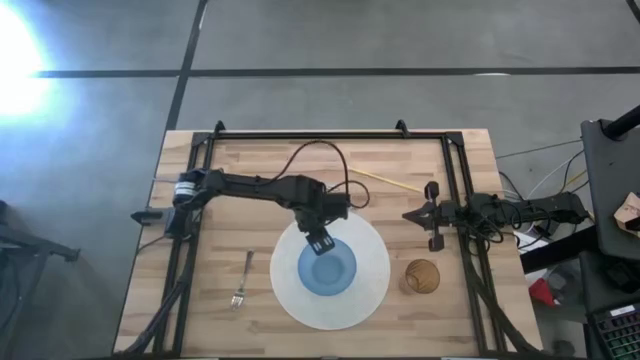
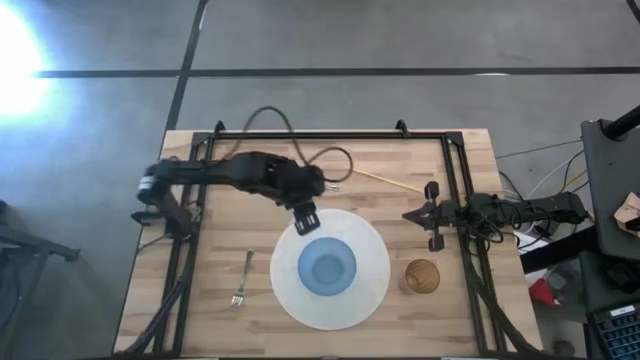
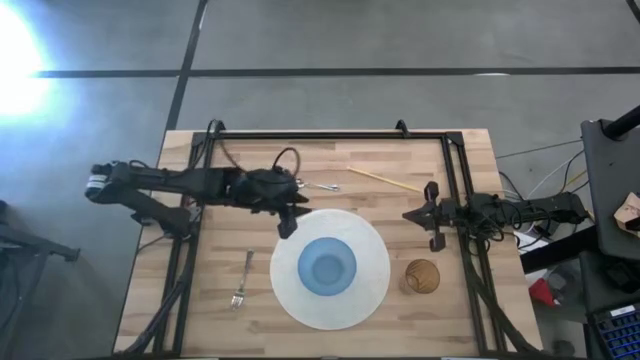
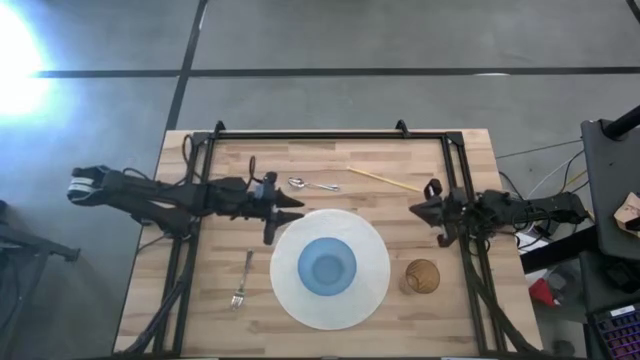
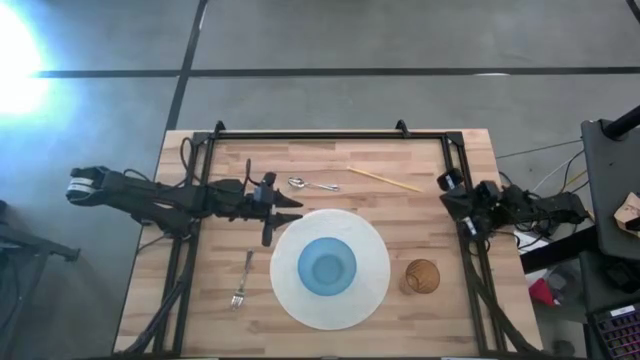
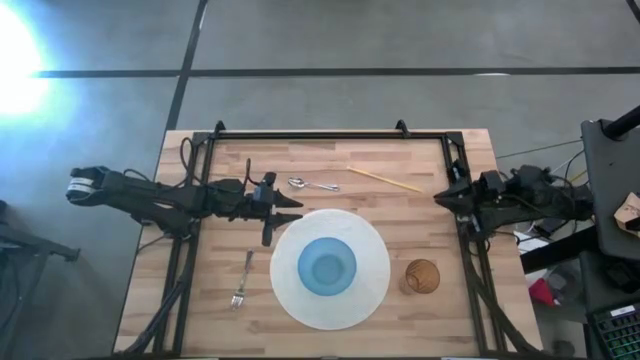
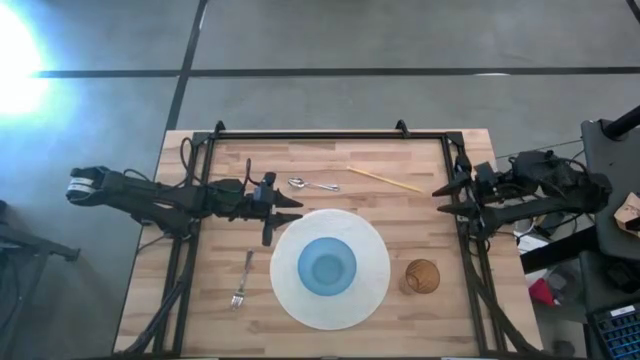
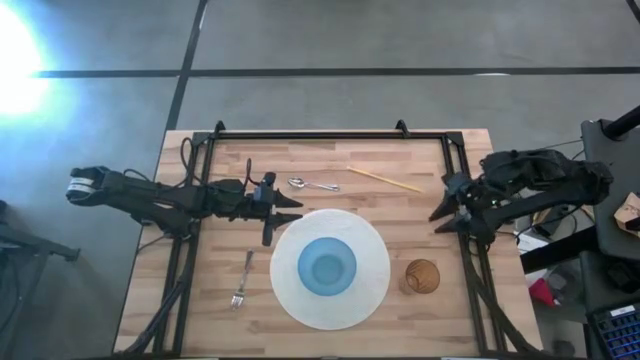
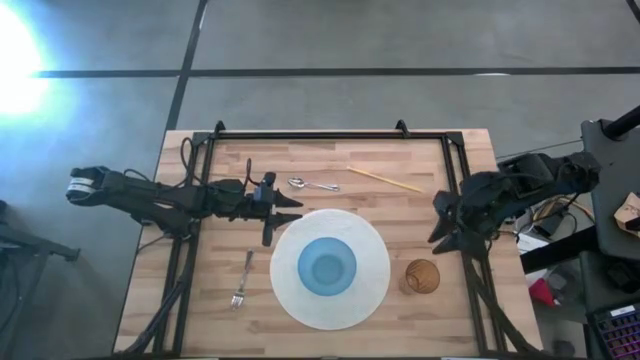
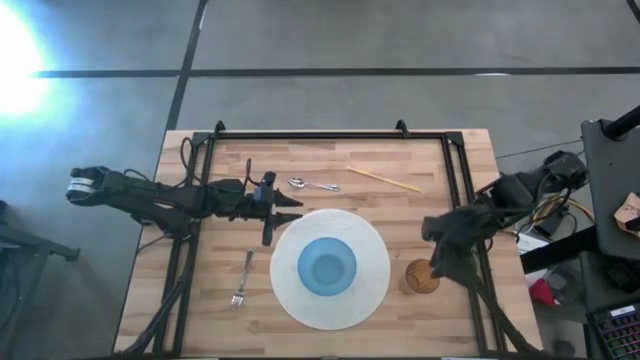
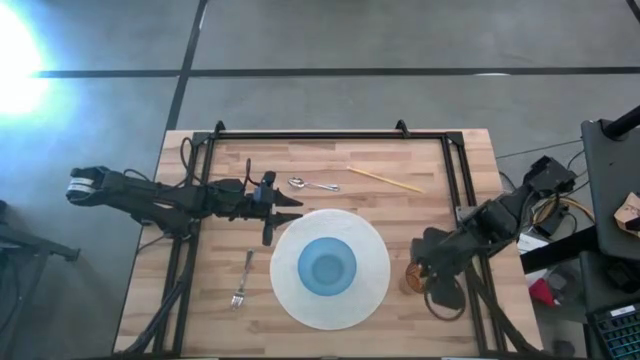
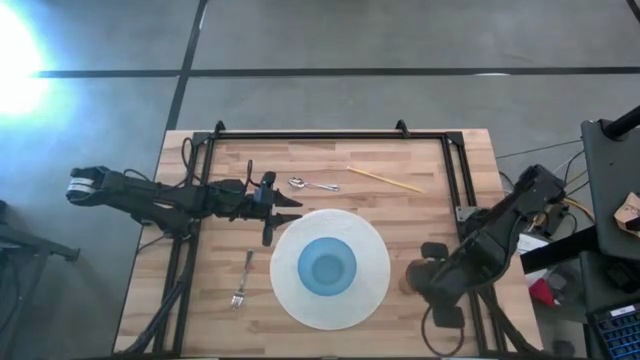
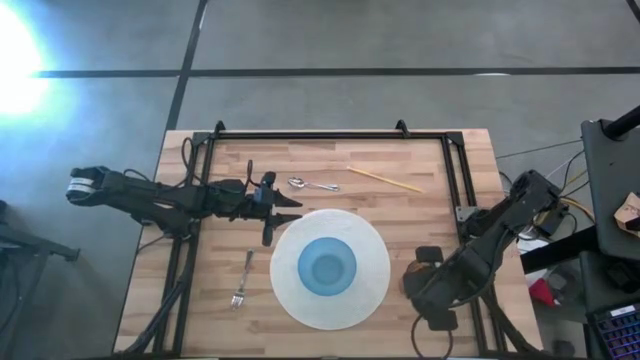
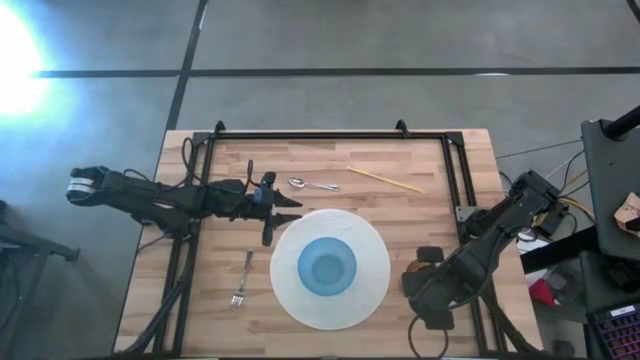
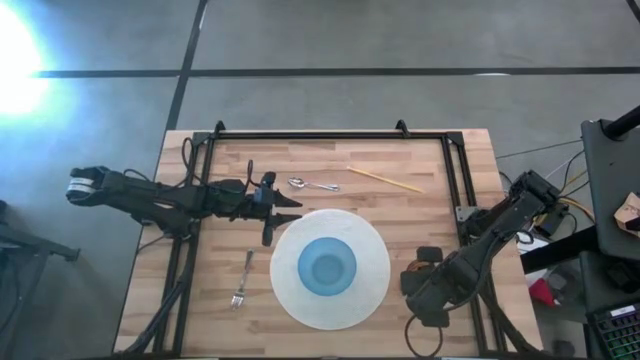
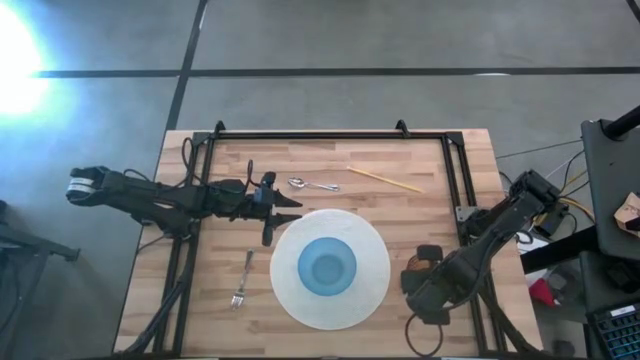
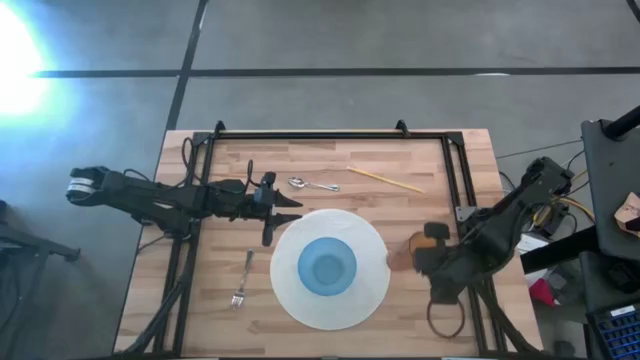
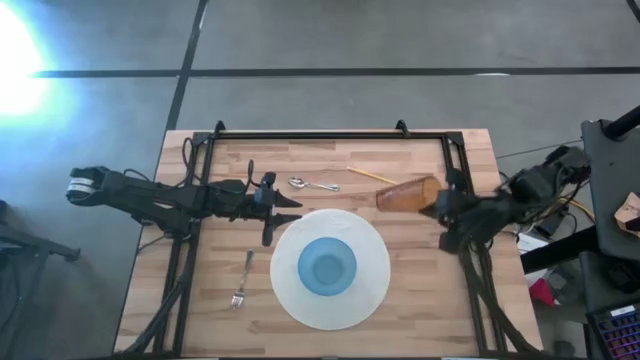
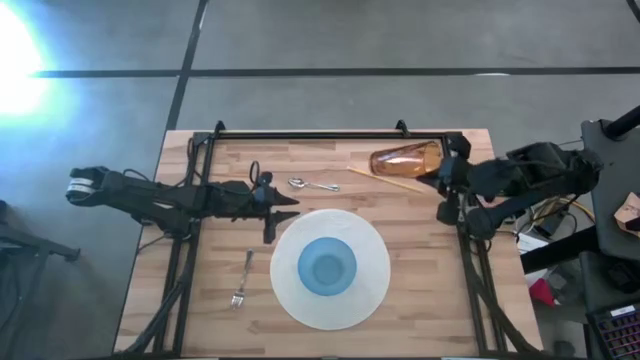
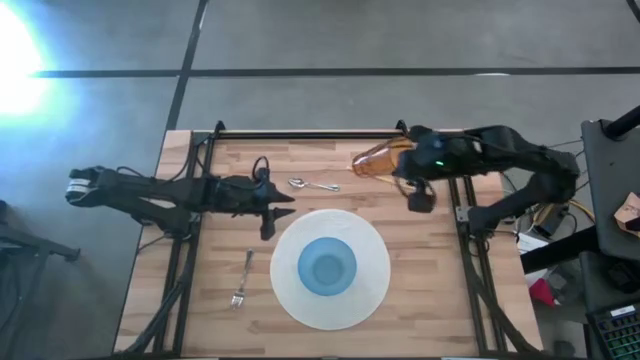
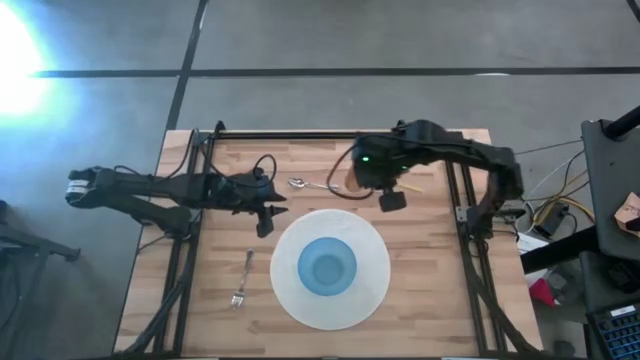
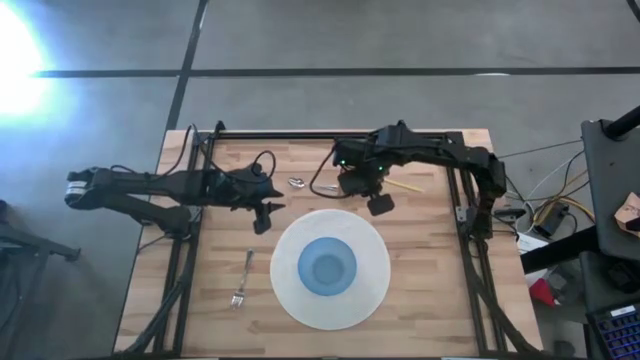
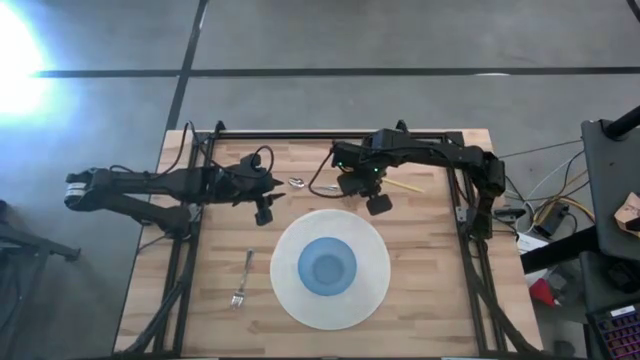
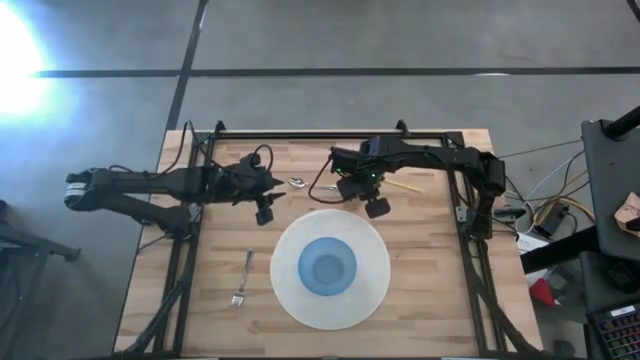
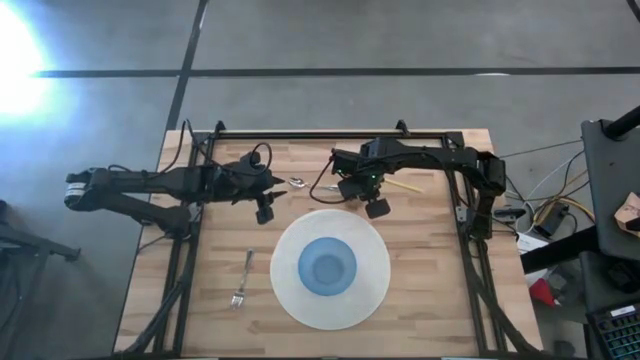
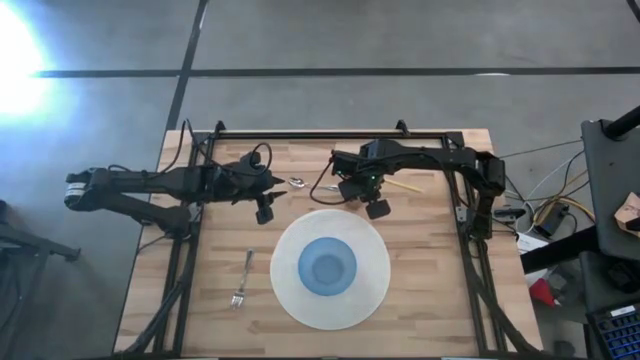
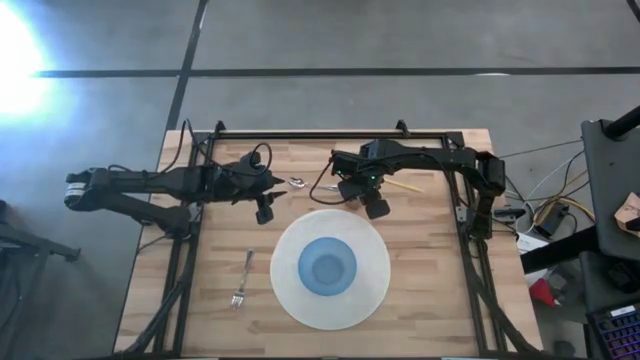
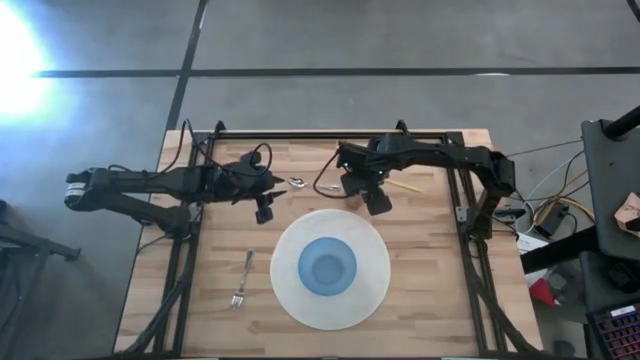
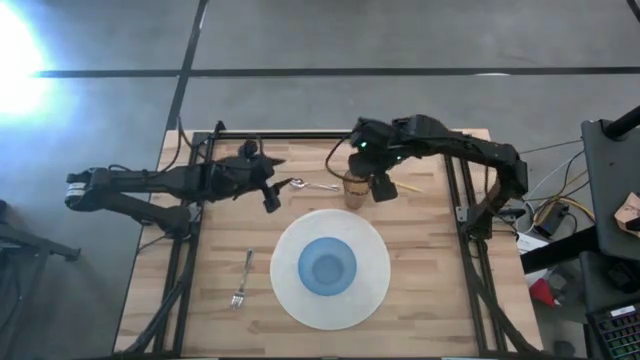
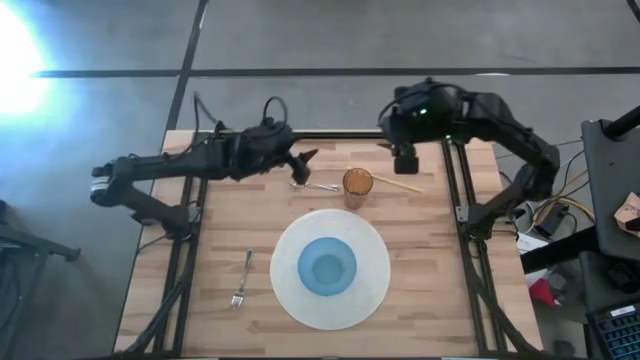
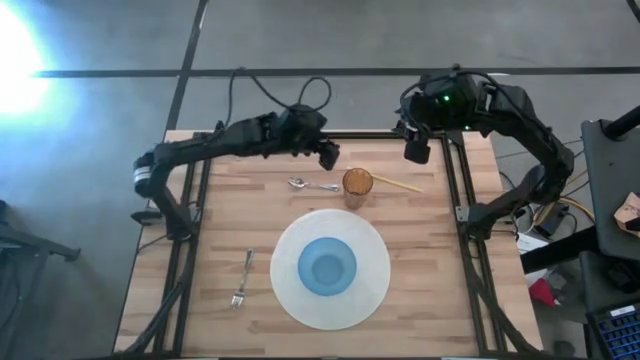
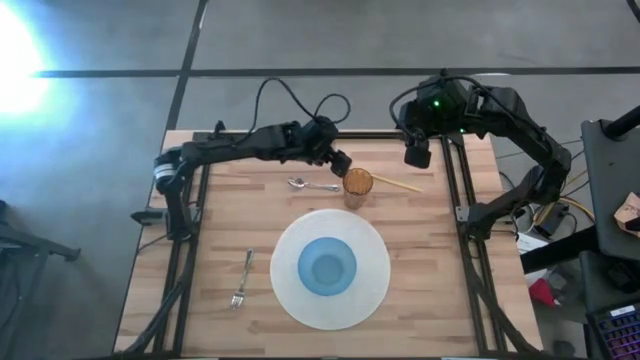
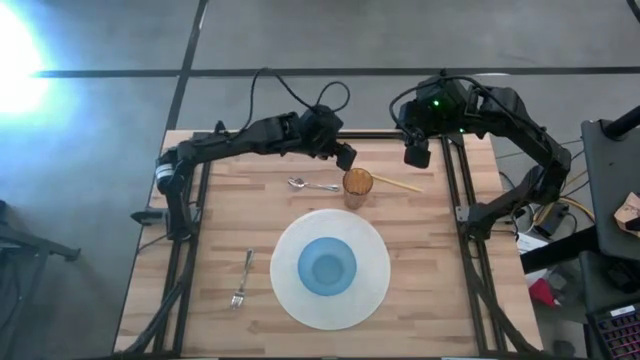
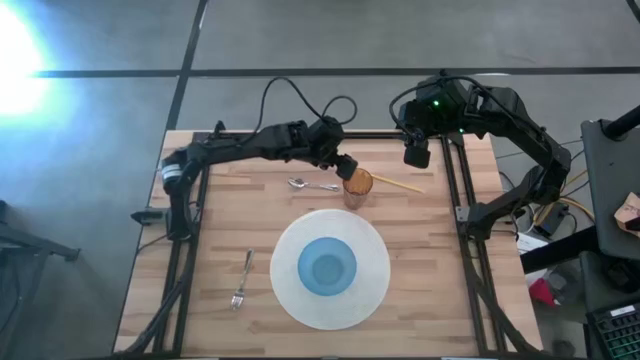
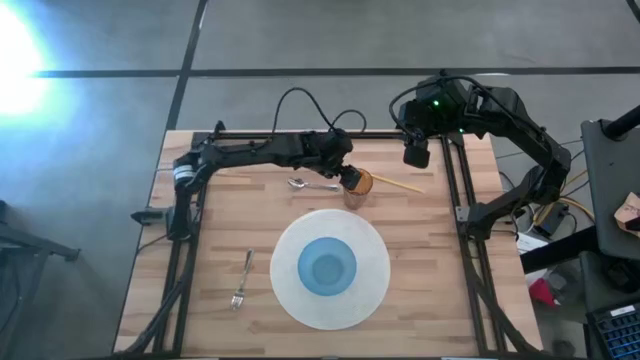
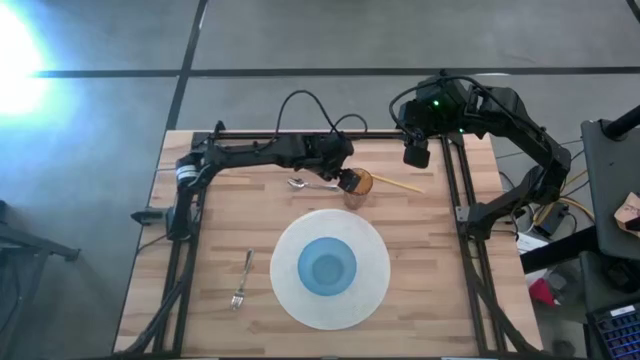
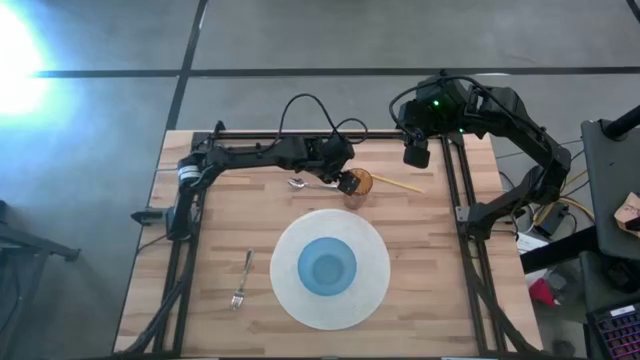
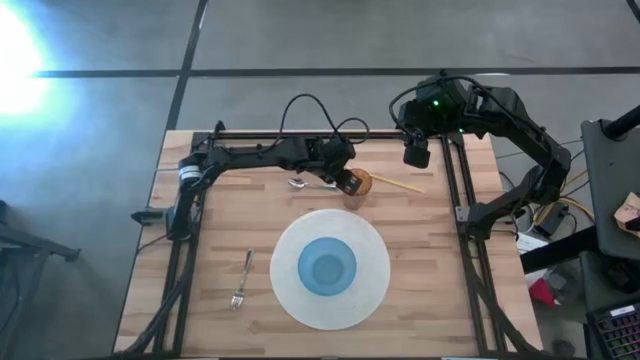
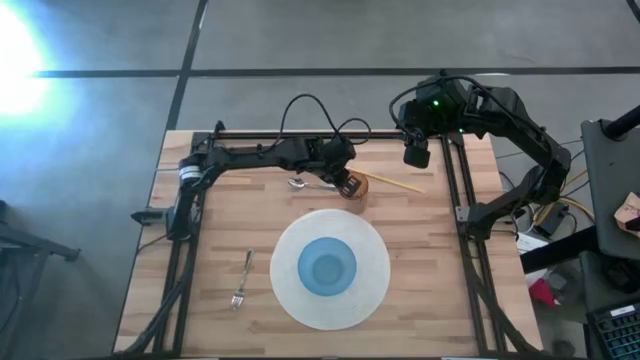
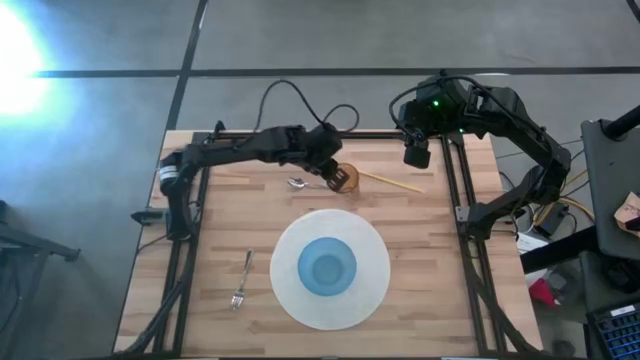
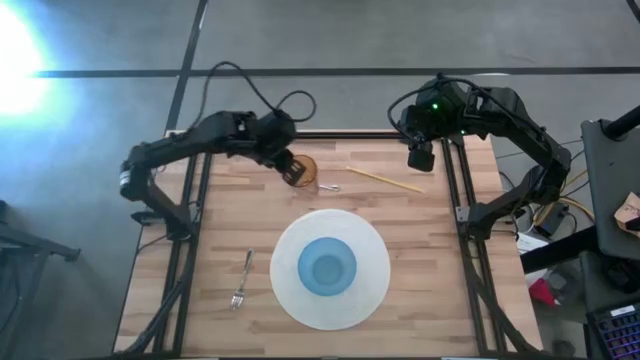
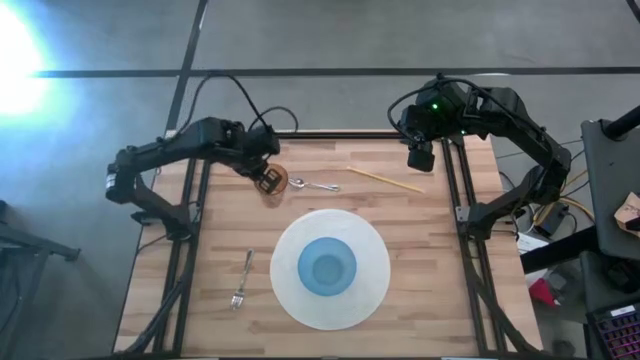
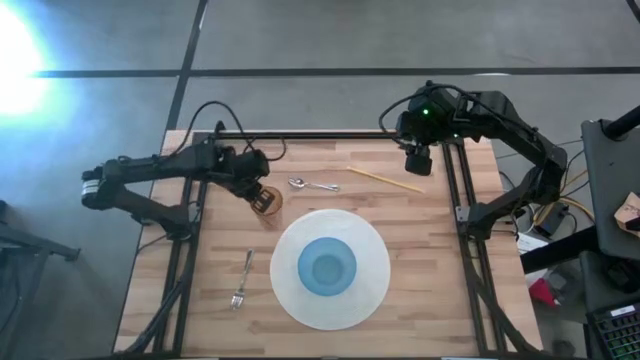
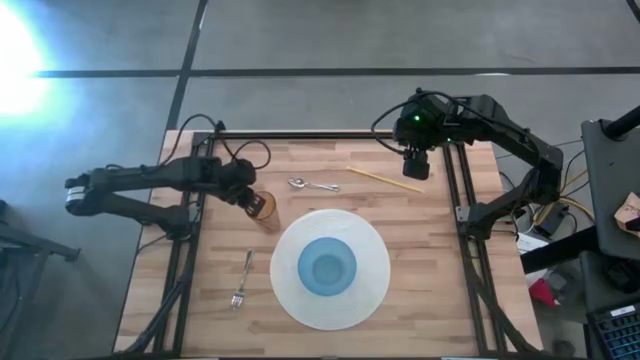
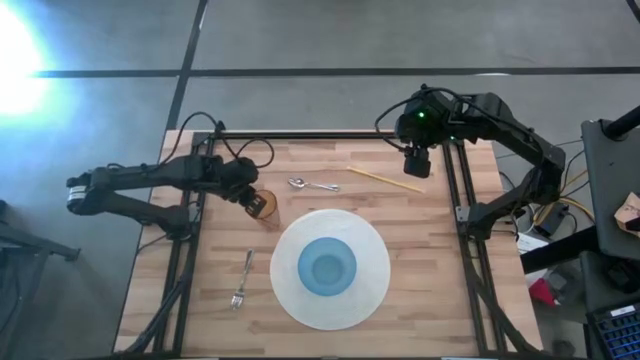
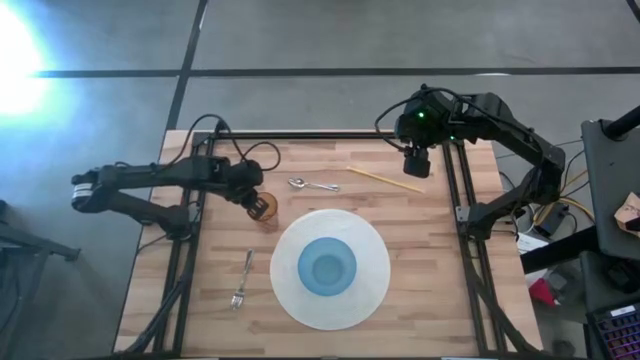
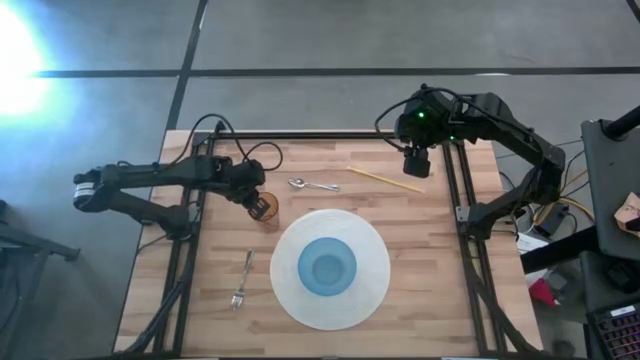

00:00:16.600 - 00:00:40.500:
Task: Pick & Place Utensil
Move the yellow glass to the top left of the white mat
